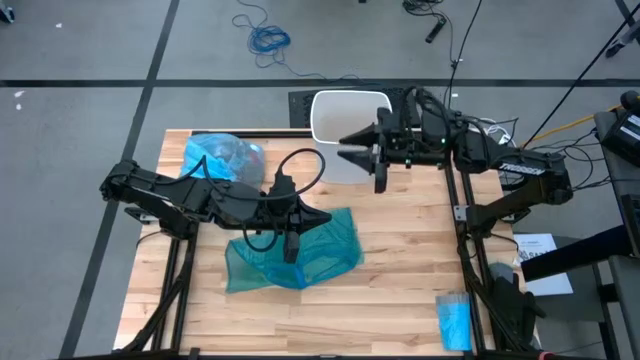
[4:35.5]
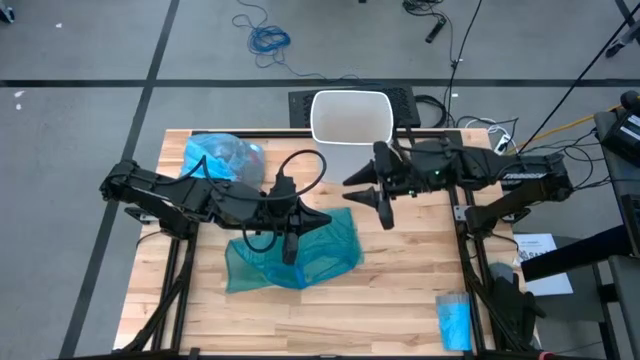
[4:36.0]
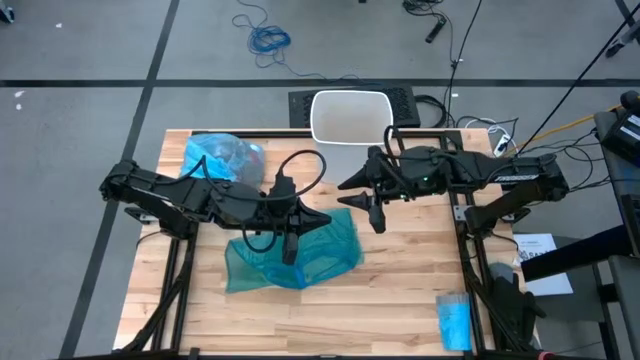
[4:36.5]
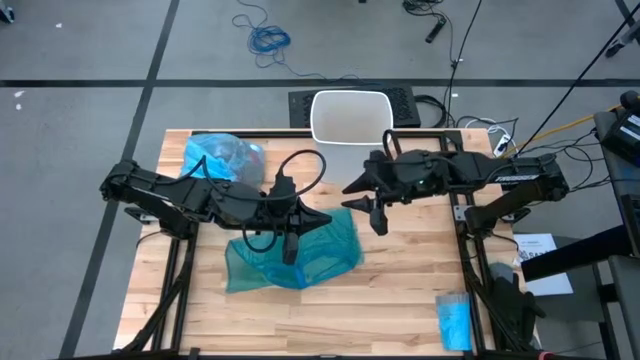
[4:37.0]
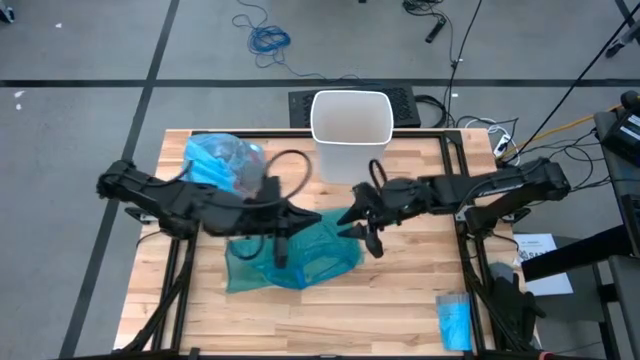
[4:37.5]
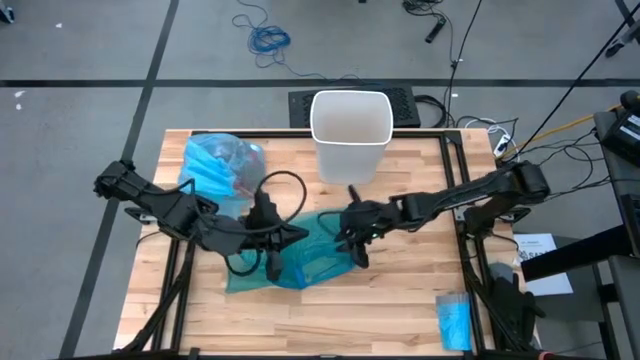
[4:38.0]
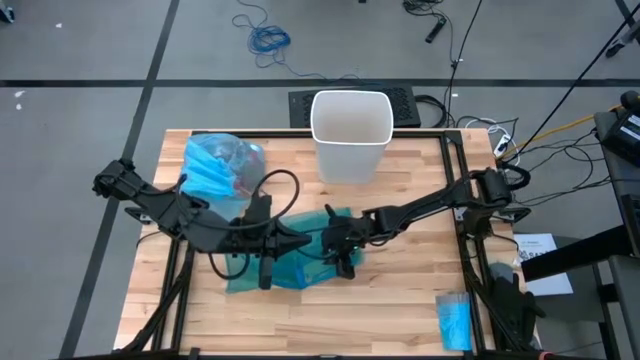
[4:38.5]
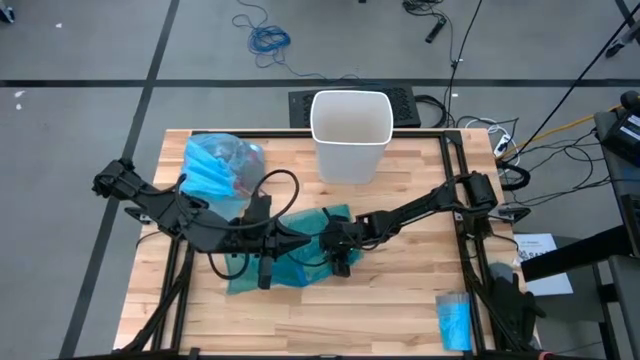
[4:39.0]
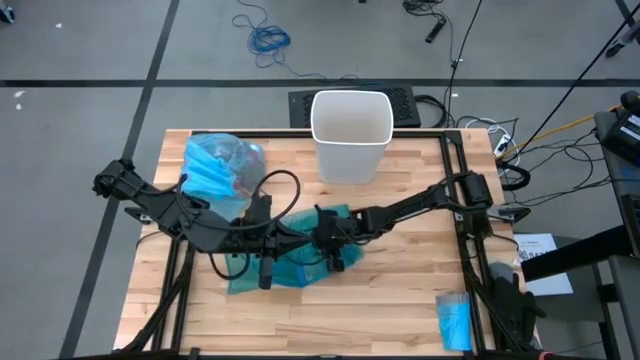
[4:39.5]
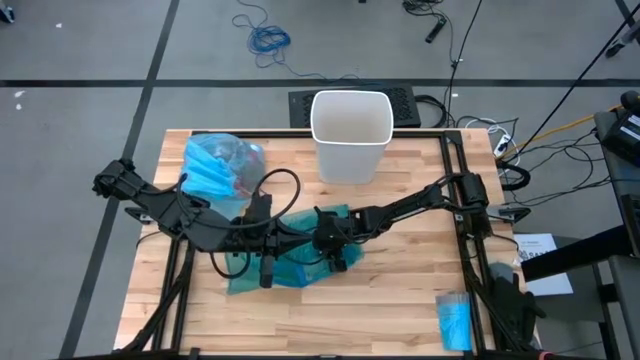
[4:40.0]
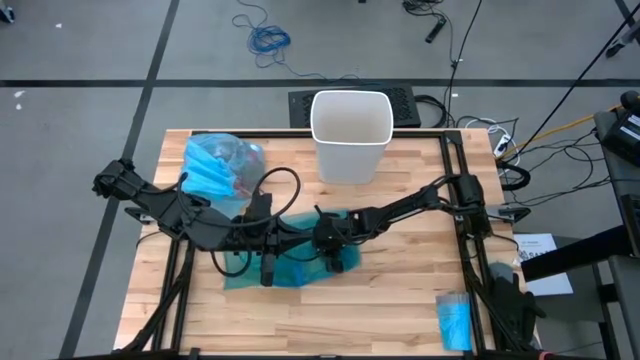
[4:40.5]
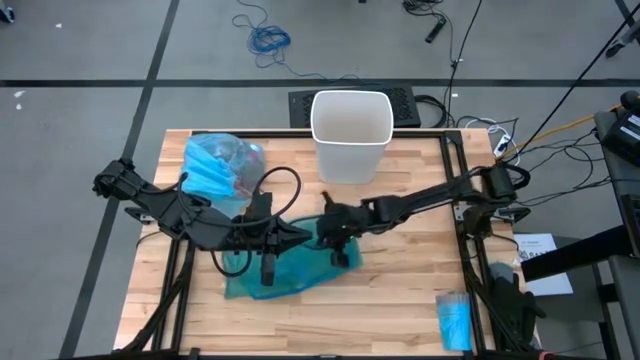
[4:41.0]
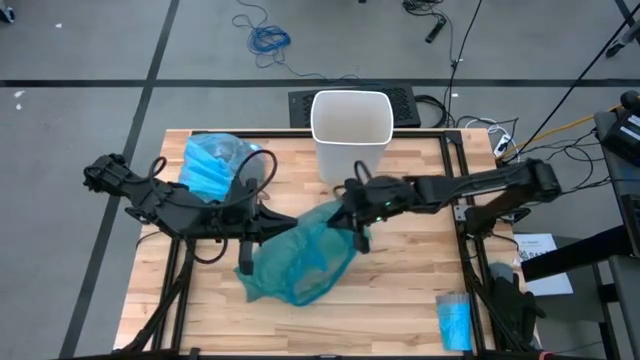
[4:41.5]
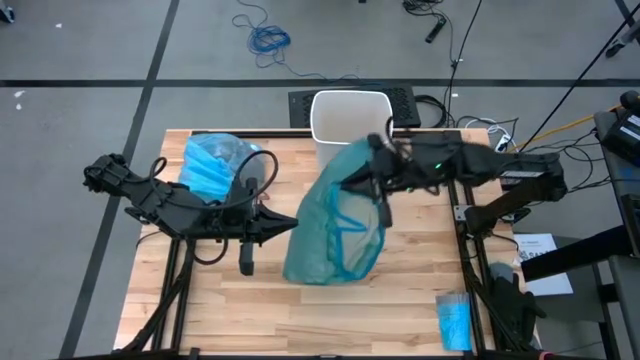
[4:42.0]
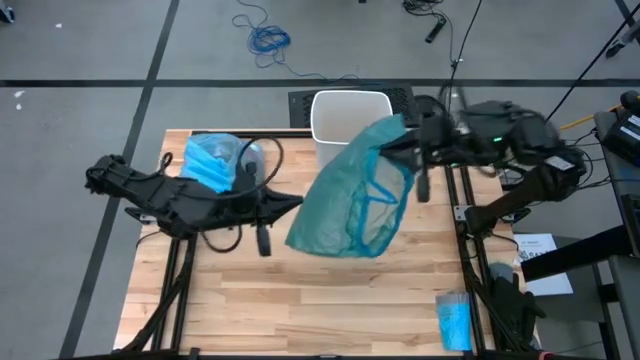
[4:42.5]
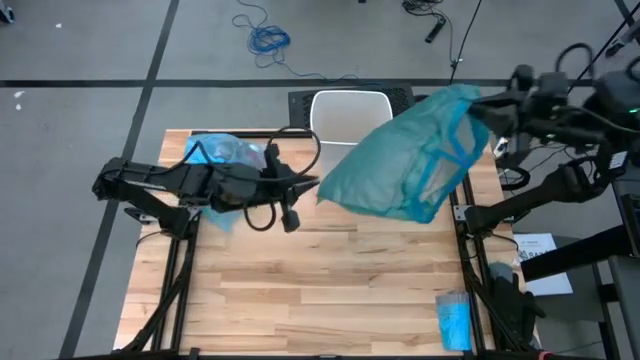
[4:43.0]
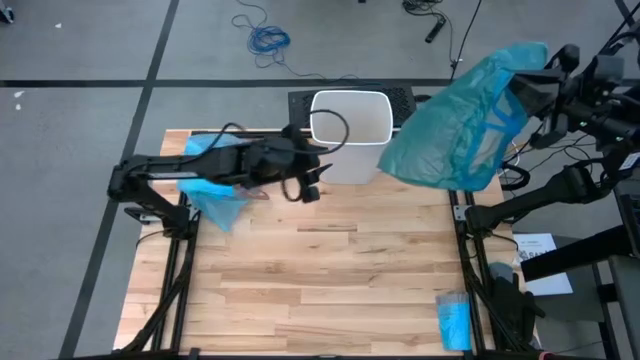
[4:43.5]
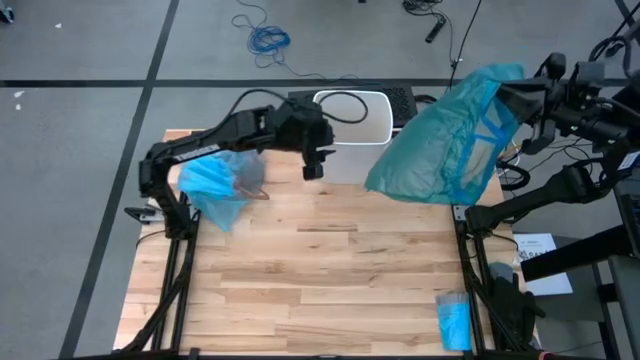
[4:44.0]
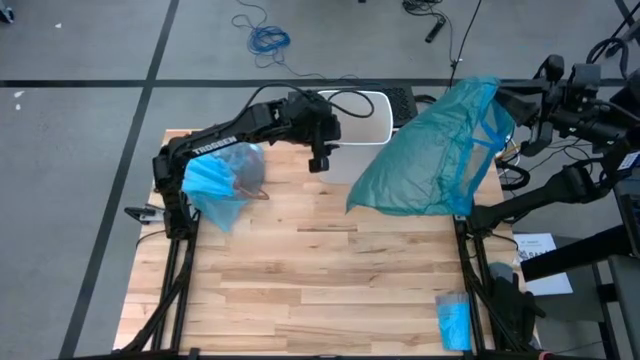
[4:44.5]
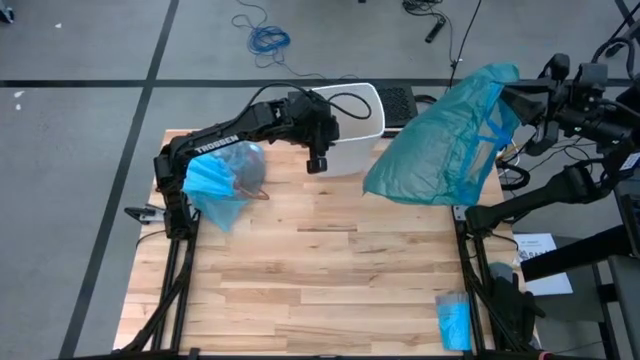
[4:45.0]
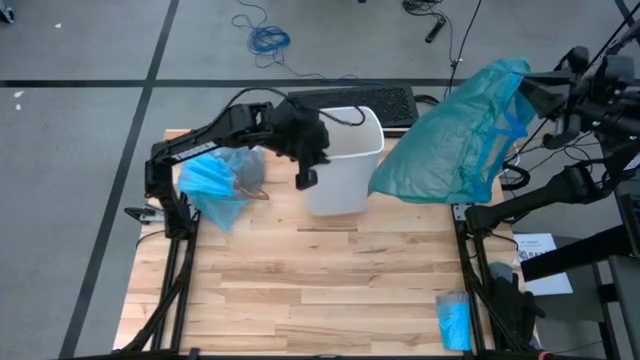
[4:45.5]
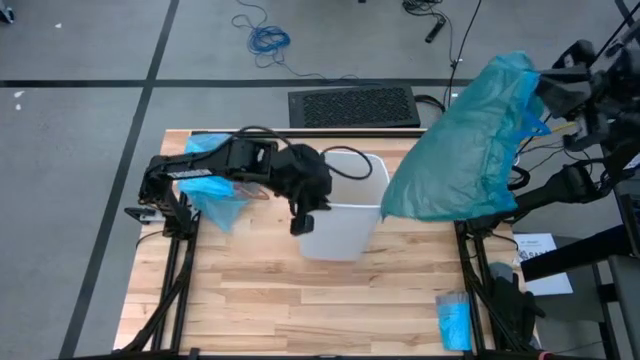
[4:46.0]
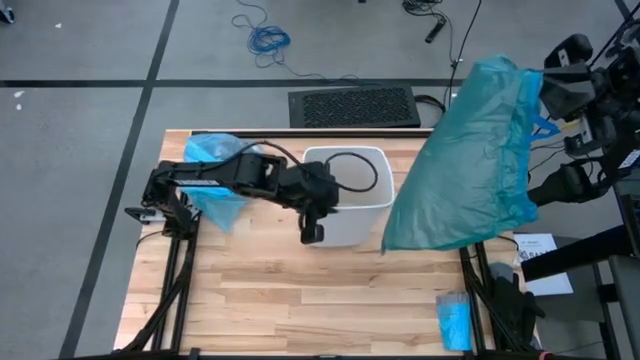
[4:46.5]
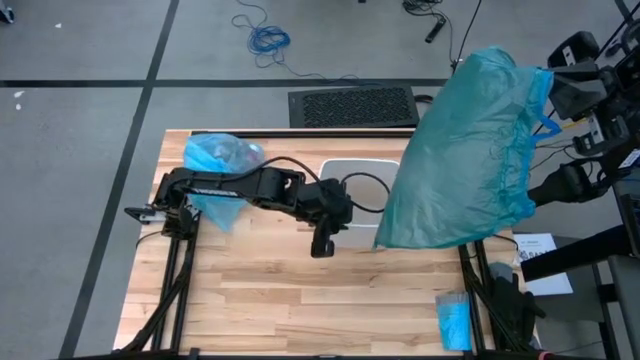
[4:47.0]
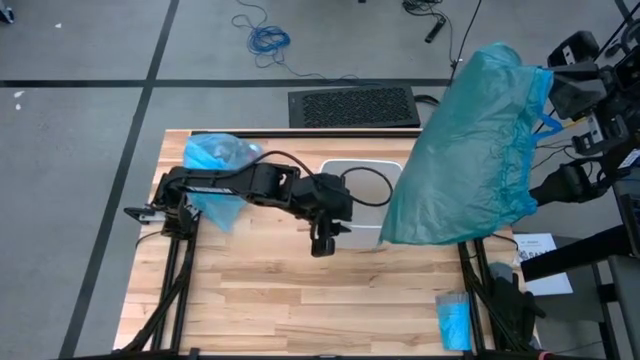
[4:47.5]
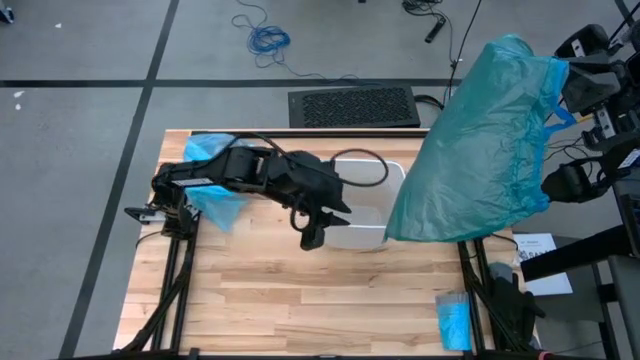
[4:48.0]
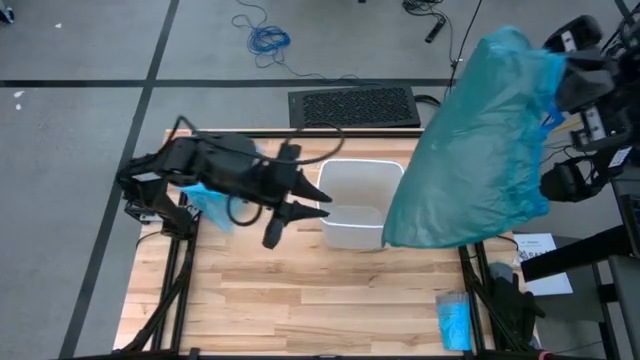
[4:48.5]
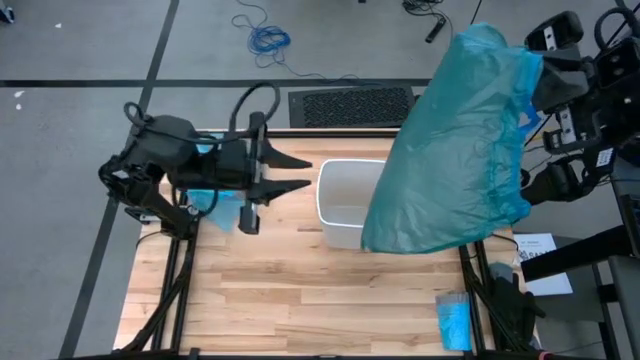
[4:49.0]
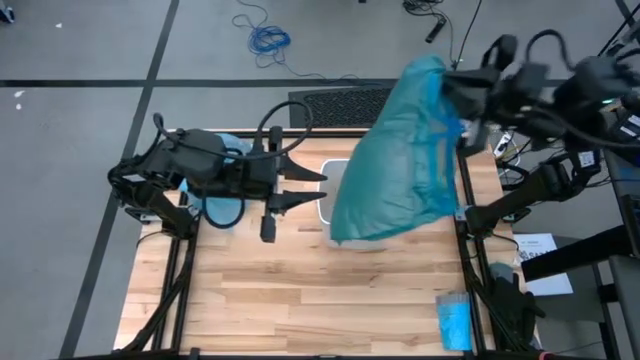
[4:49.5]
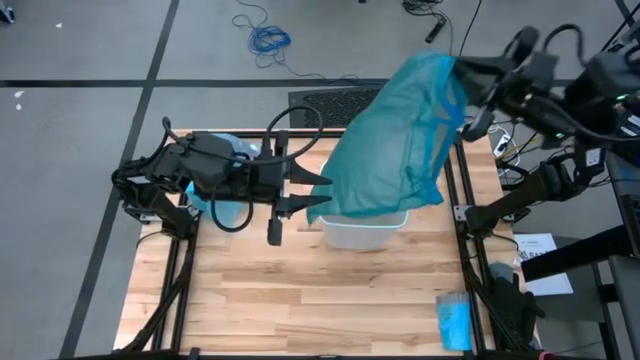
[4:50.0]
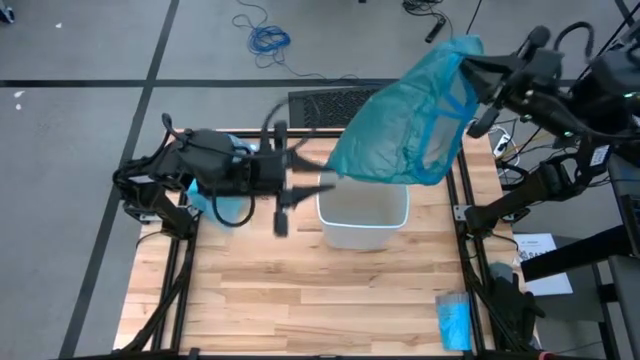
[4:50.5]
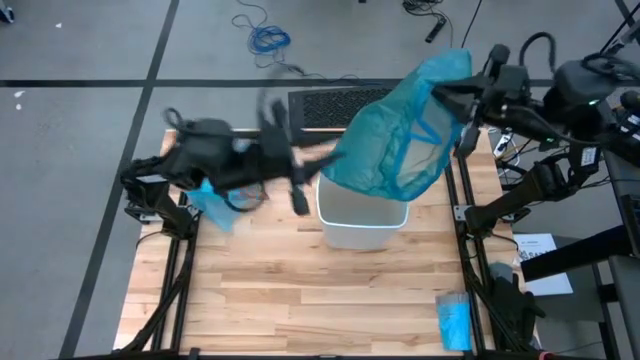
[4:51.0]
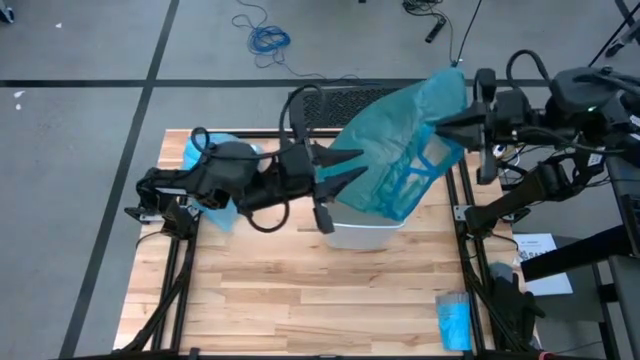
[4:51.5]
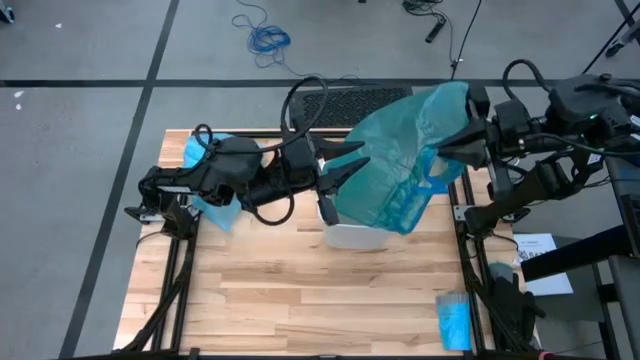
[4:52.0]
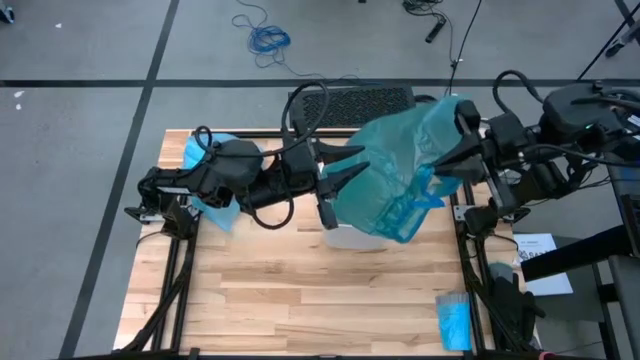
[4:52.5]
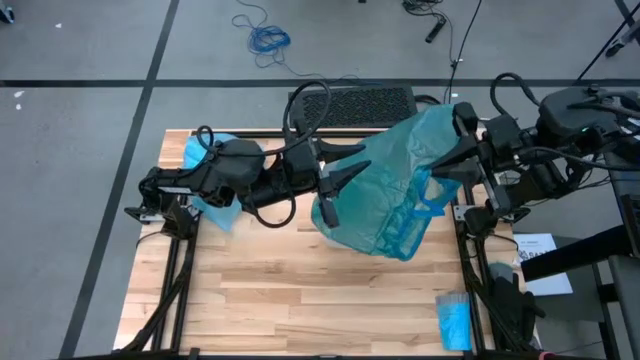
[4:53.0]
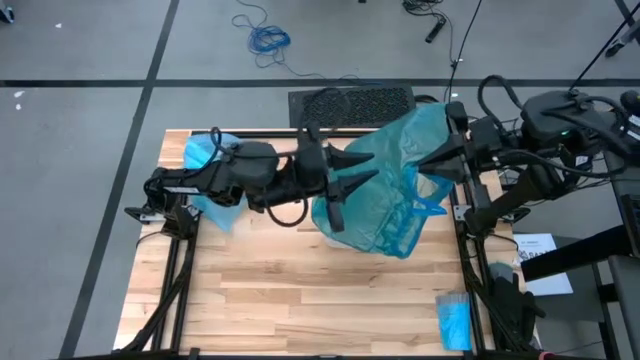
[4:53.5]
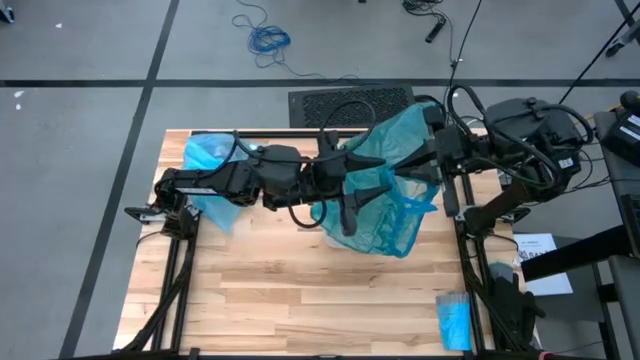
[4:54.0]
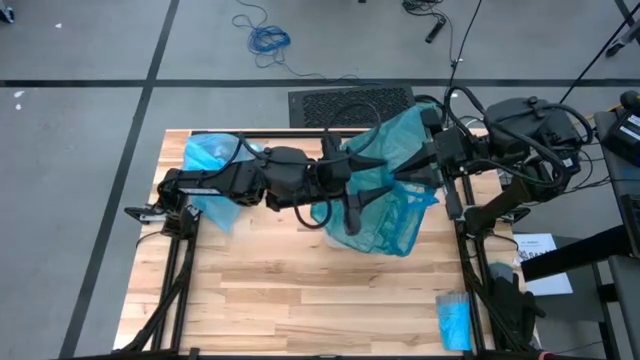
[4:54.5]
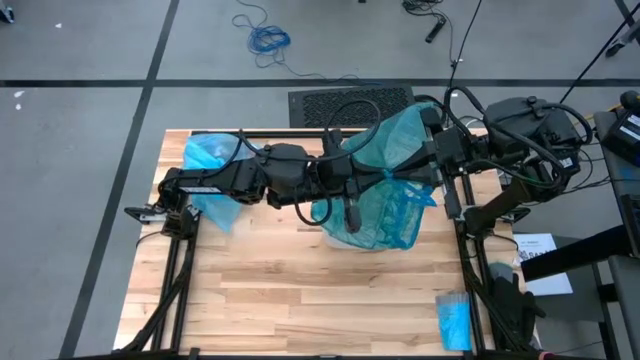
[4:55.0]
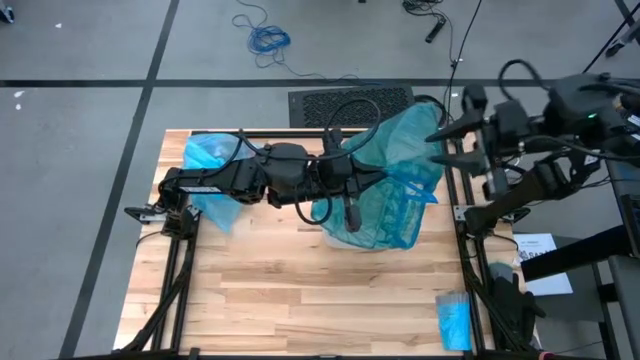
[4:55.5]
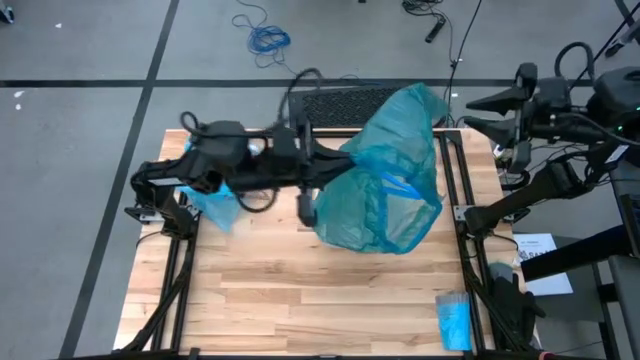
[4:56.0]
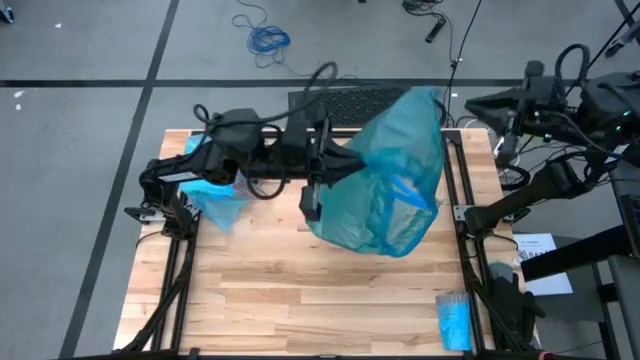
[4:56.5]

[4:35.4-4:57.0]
Task: place trash/remove bag and relplace
Insert the new blue trash bag into the white trash bin
